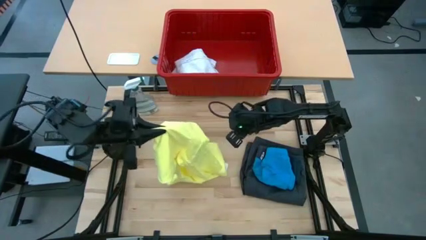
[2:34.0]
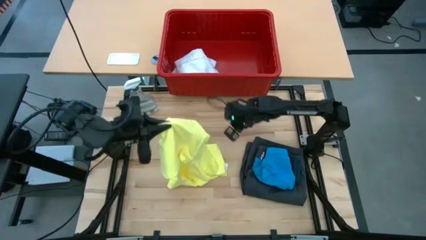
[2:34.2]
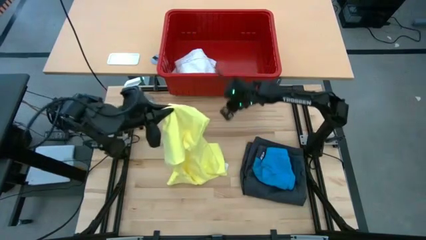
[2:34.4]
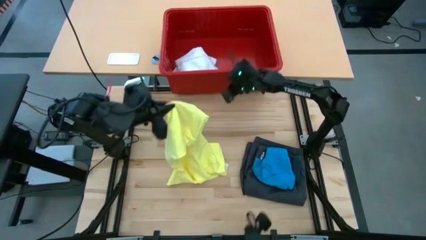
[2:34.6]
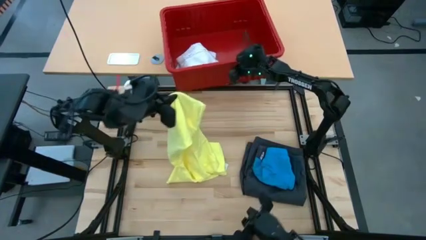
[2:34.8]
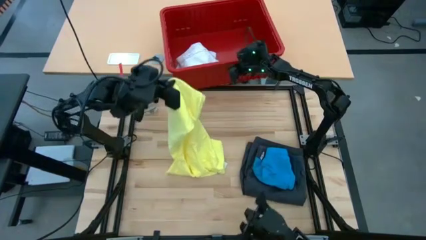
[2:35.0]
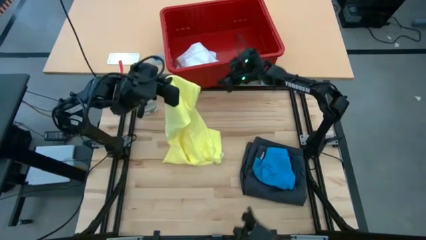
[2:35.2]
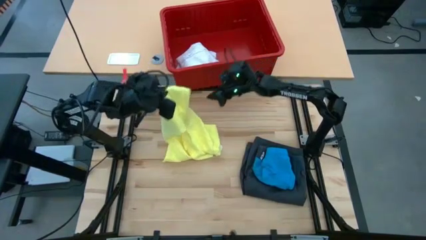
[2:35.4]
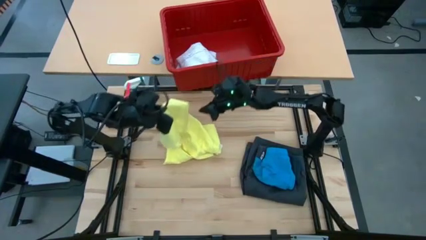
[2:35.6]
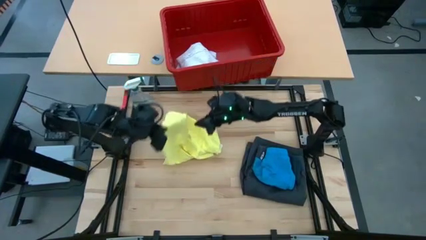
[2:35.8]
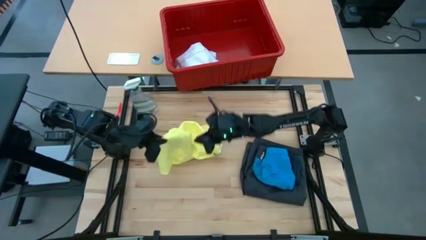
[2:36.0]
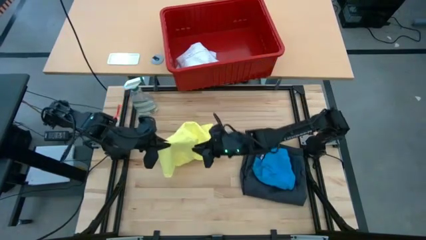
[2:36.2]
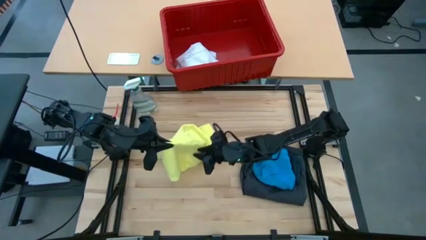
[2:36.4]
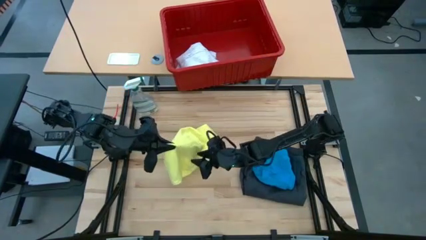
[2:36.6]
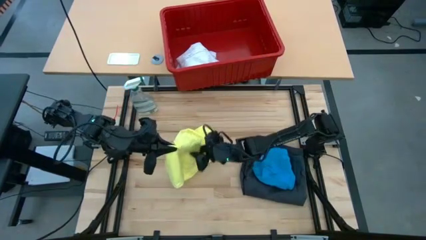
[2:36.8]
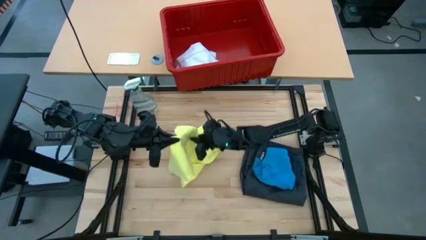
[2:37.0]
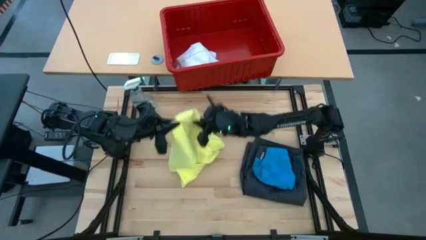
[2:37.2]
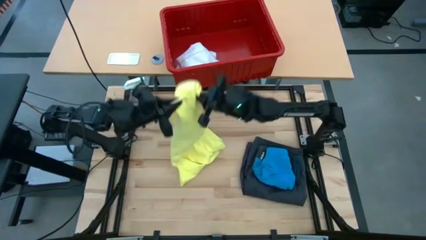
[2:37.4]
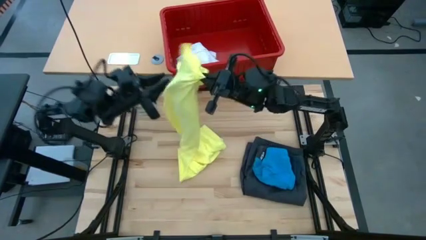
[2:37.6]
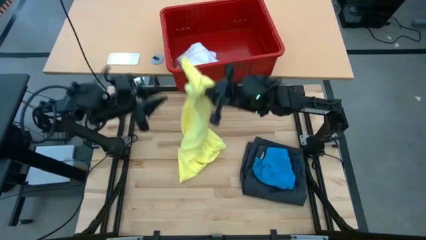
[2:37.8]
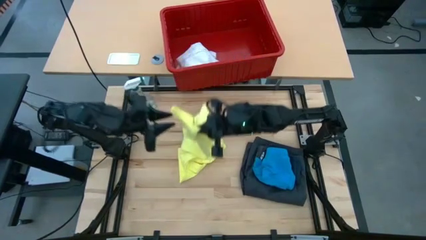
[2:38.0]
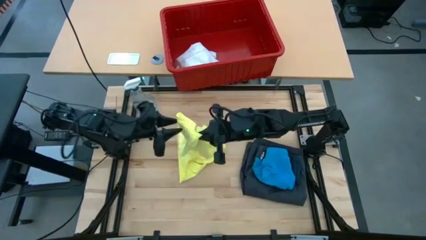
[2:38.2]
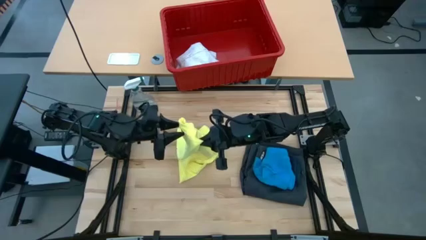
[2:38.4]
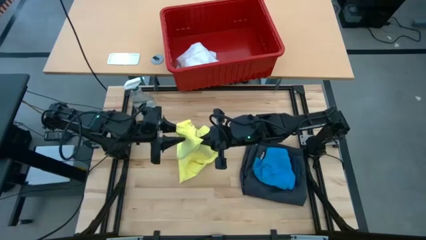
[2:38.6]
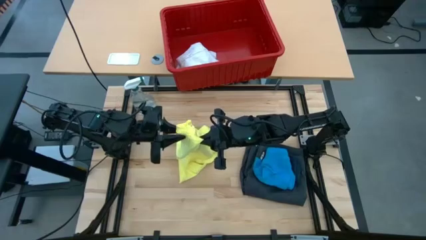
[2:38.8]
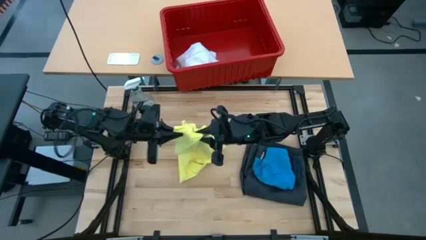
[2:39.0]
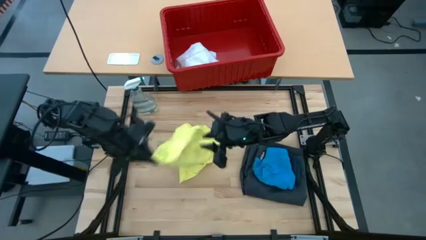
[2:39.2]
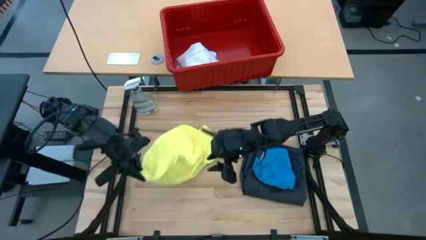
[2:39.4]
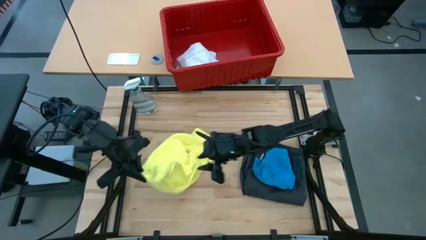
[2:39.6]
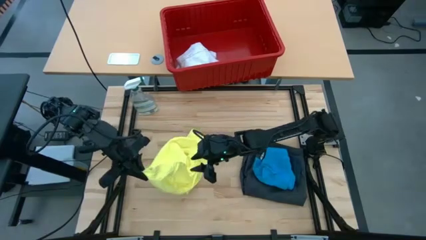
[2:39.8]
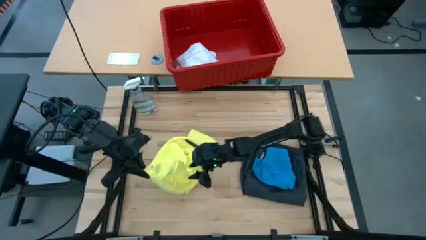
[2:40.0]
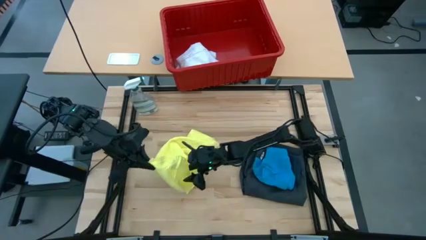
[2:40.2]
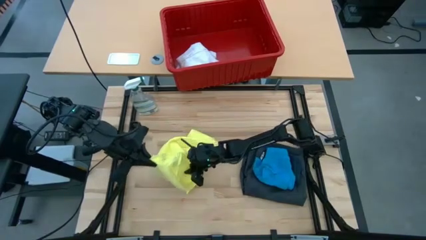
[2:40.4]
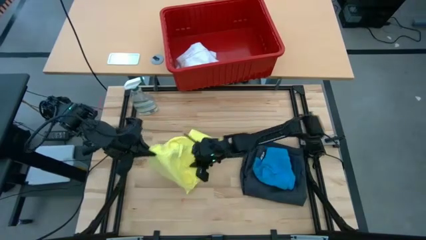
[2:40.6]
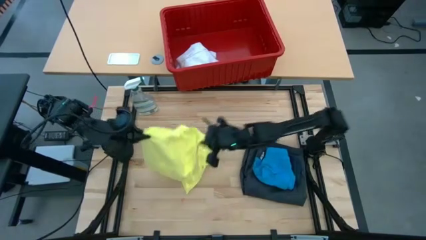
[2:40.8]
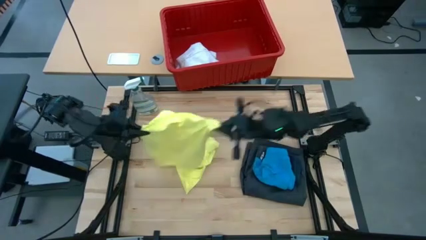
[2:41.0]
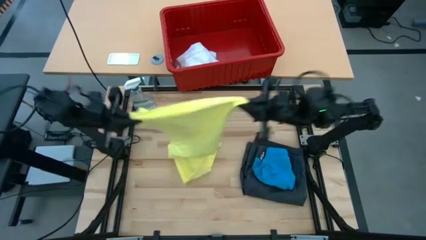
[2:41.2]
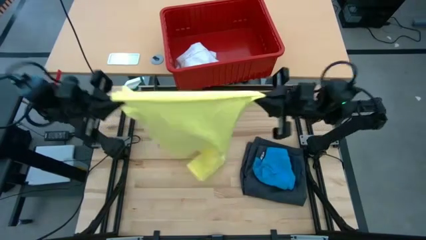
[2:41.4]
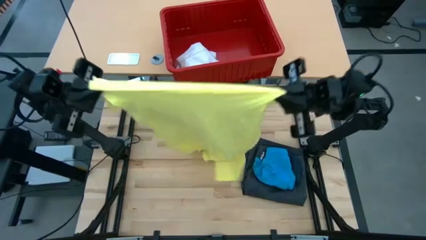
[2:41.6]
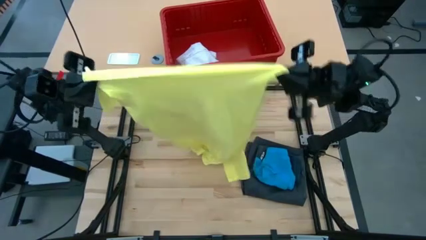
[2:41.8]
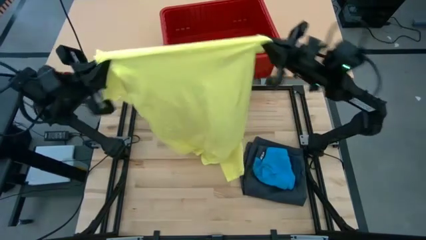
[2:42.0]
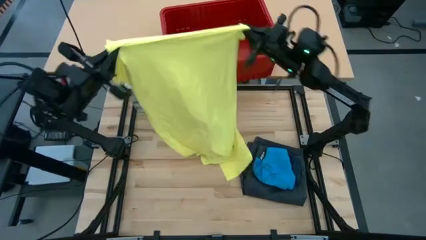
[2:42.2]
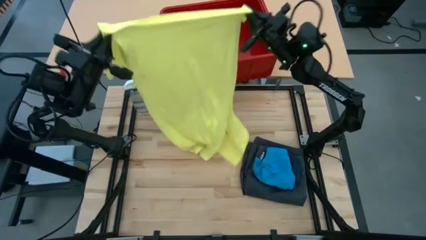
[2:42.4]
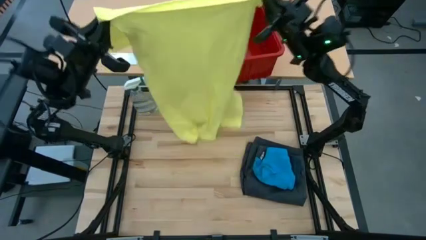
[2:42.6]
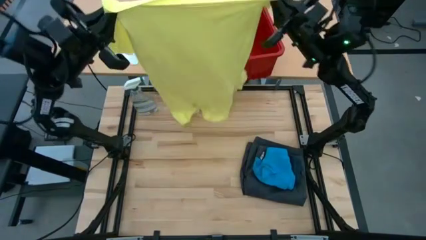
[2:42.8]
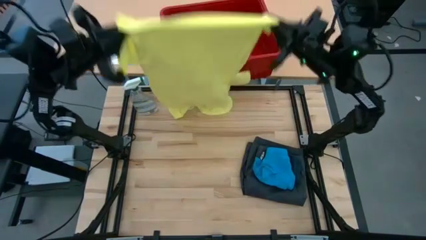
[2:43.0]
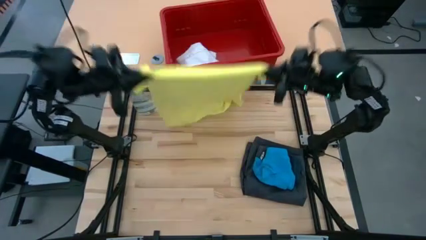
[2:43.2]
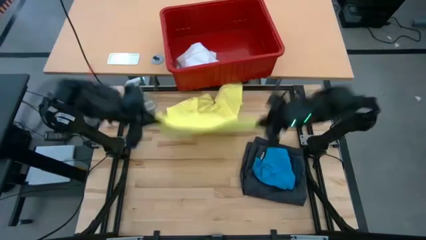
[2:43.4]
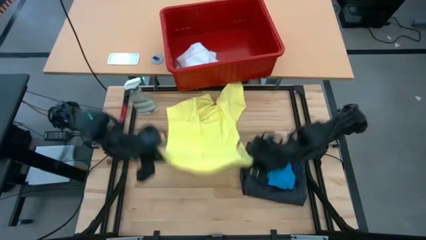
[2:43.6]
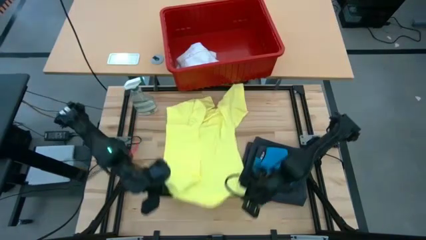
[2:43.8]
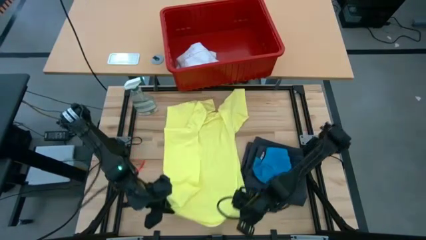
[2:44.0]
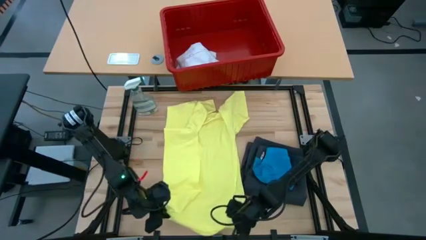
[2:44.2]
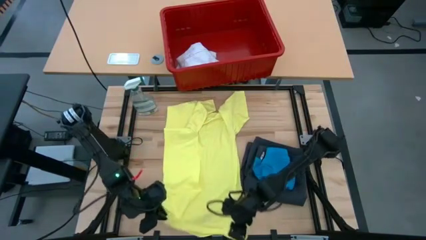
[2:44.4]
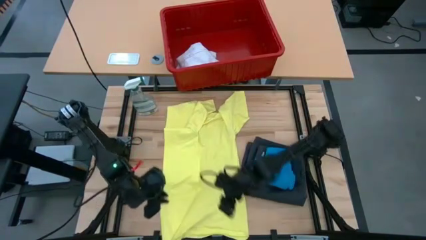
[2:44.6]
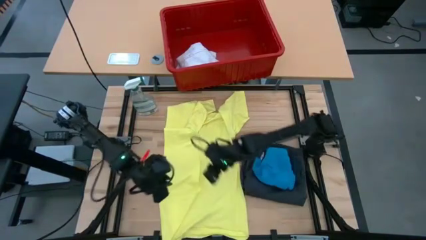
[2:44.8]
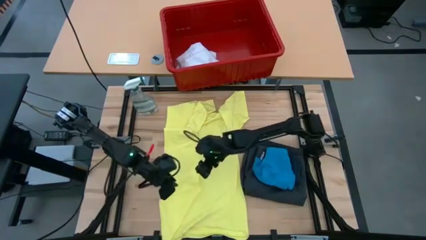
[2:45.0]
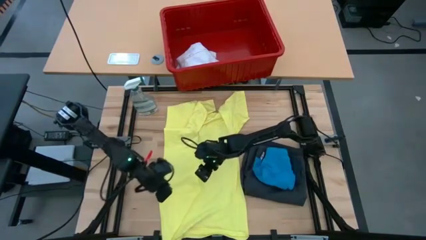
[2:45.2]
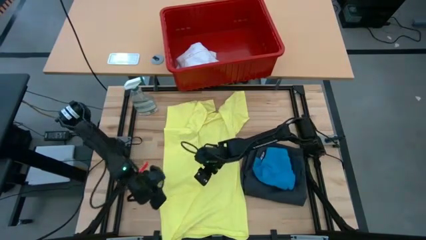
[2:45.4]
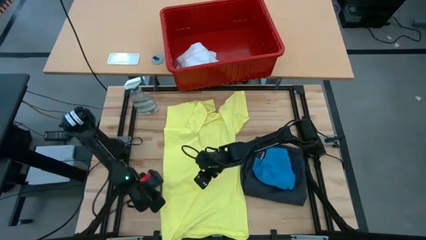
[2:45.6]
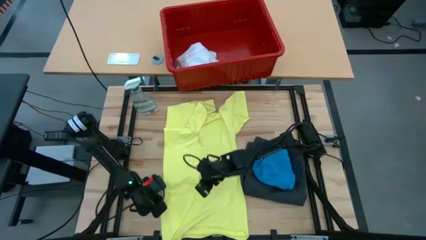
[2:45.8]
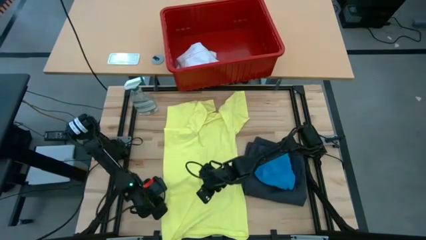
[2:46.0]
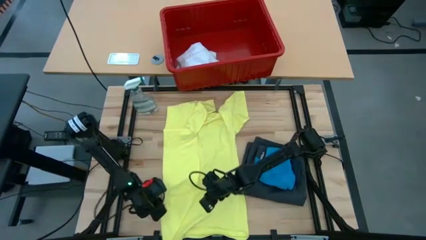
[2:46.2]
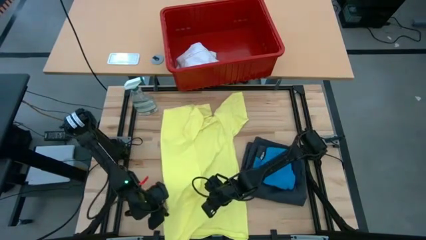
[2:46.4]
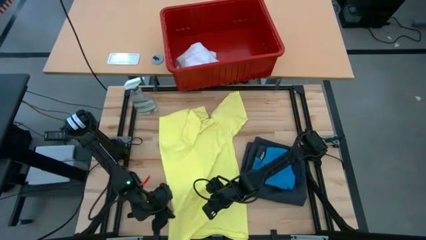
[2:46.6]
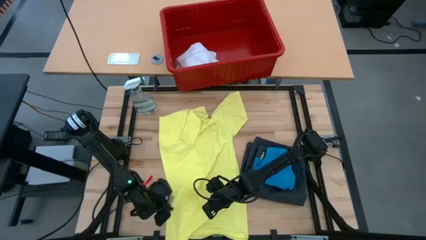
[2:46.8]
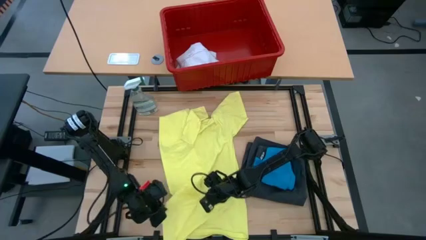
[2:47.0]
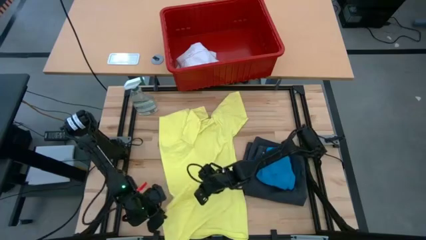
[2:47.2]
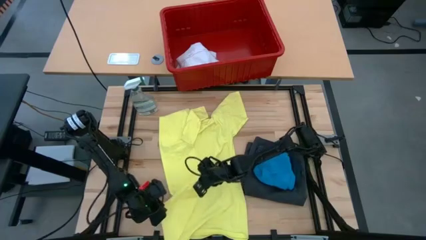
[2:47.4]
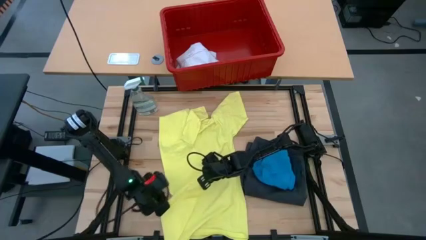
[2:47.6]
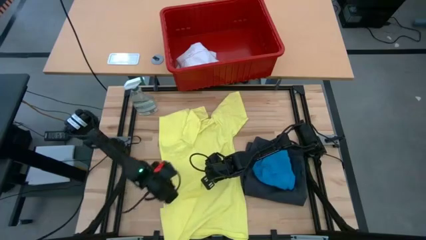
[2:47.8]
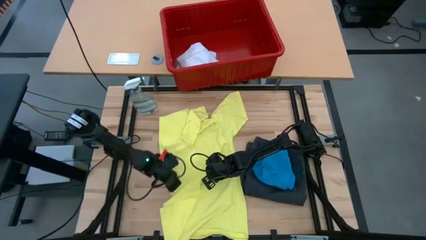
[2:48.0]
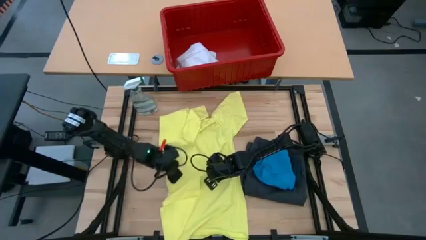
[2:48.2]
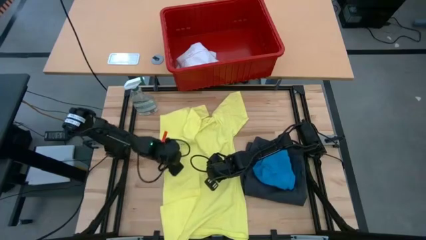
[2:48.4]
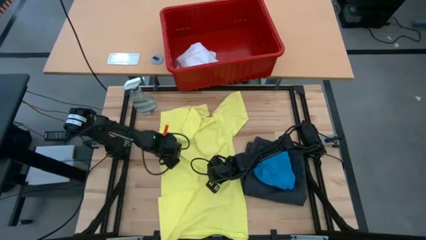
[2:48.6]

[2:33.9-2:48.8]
Task: Fold laundry
Fold the yellow shirt
